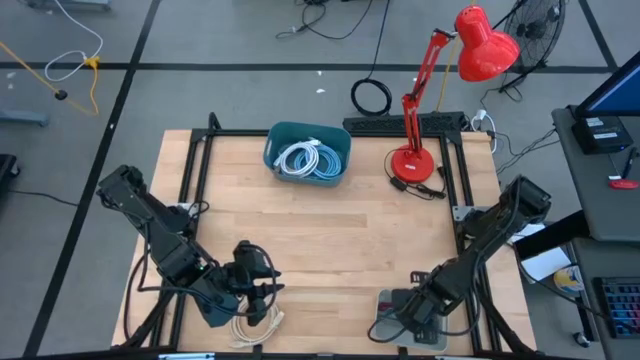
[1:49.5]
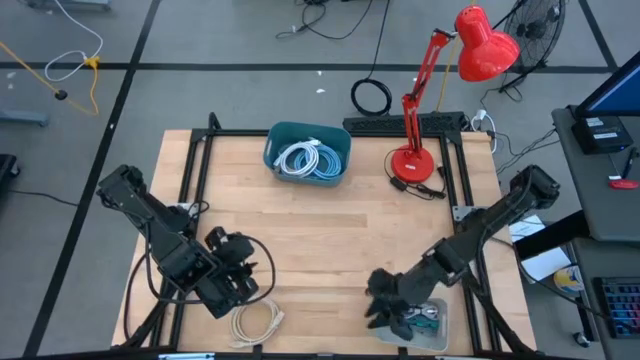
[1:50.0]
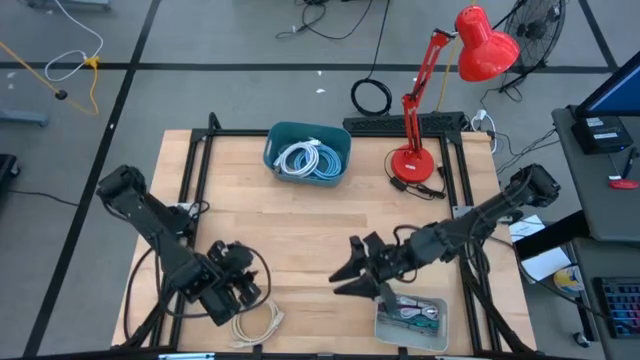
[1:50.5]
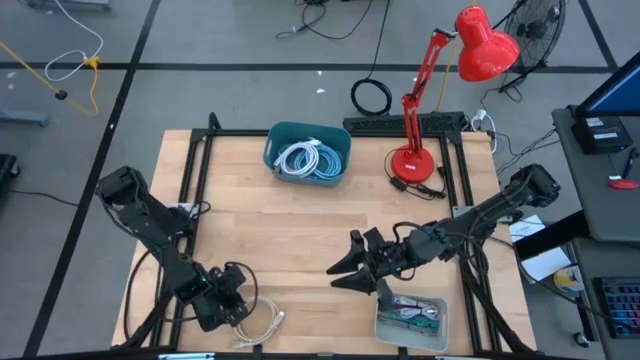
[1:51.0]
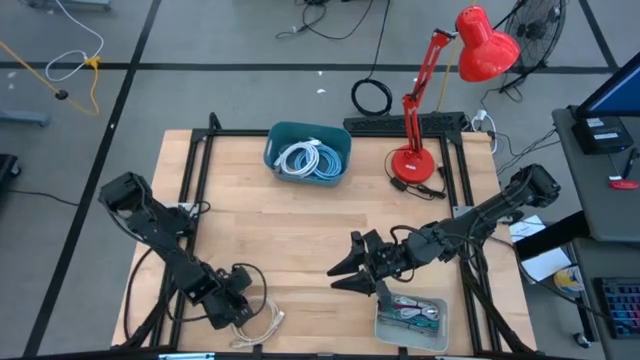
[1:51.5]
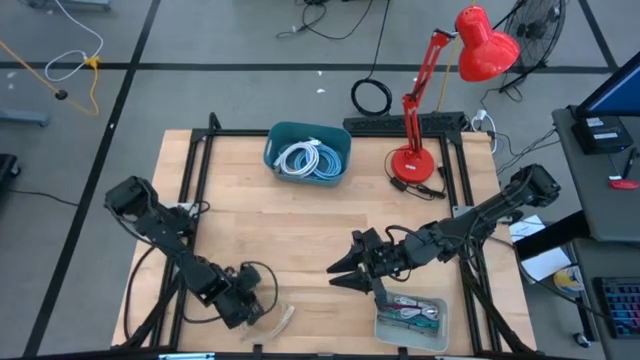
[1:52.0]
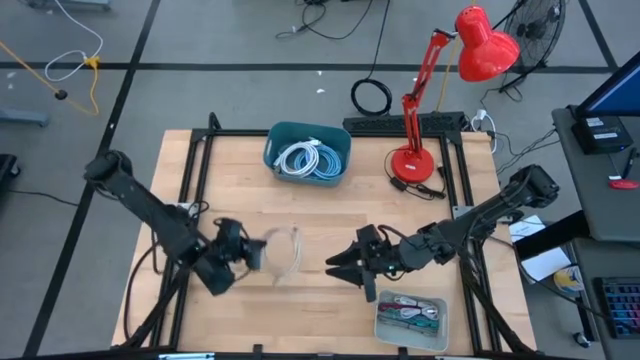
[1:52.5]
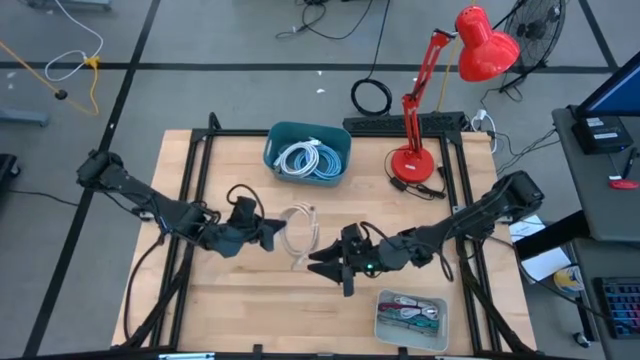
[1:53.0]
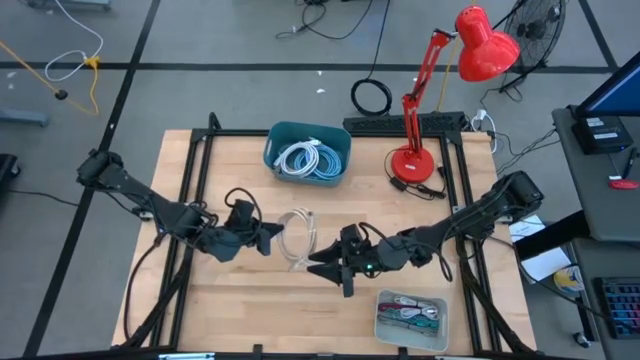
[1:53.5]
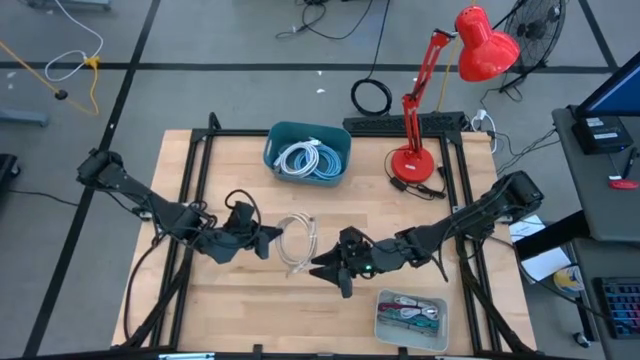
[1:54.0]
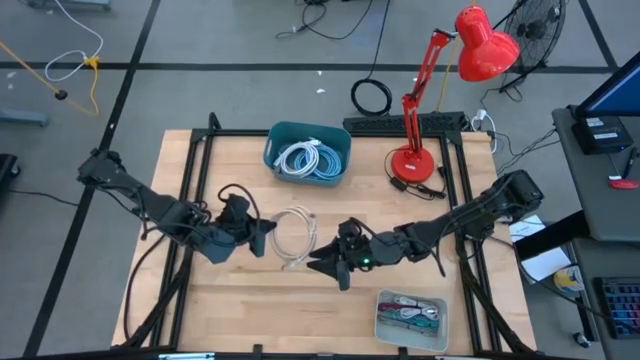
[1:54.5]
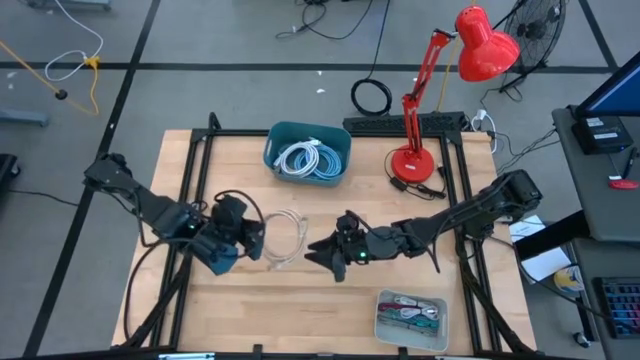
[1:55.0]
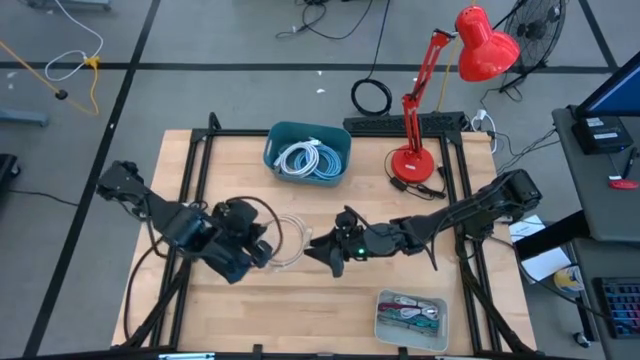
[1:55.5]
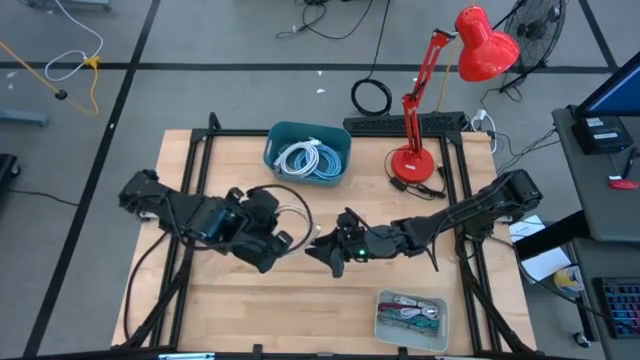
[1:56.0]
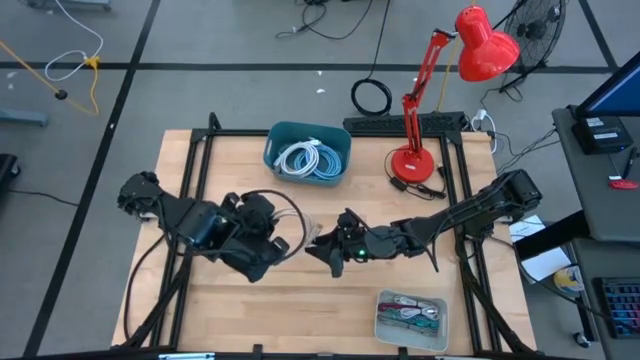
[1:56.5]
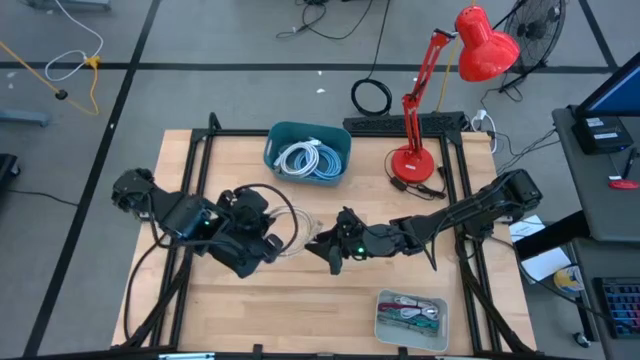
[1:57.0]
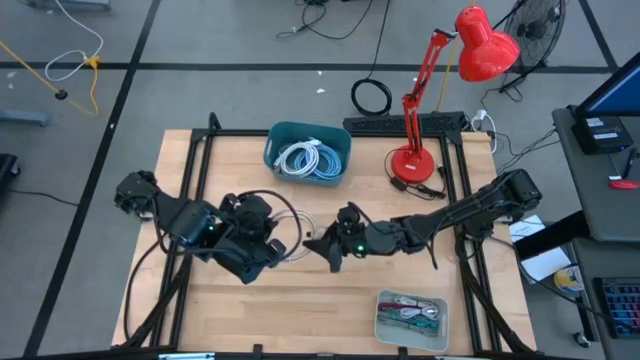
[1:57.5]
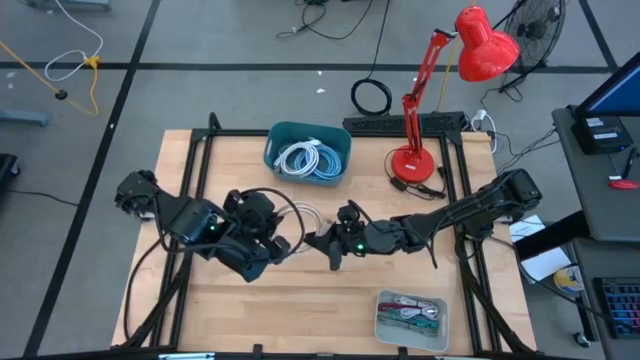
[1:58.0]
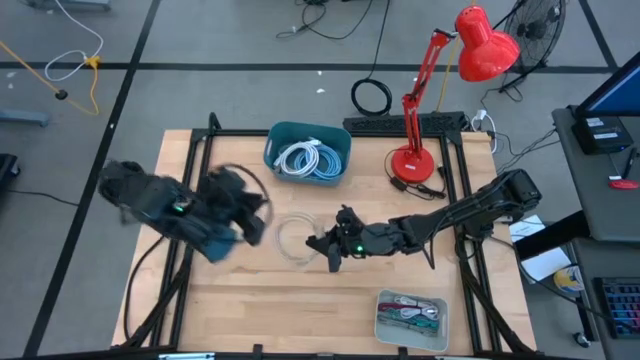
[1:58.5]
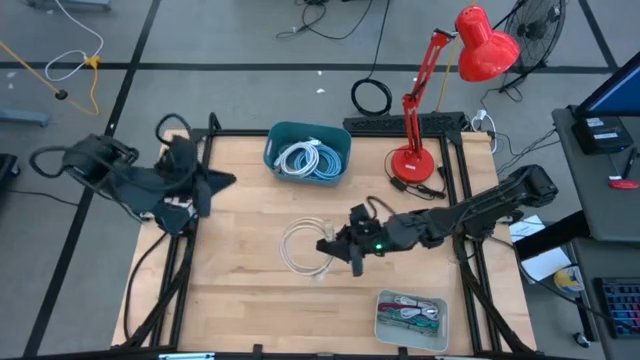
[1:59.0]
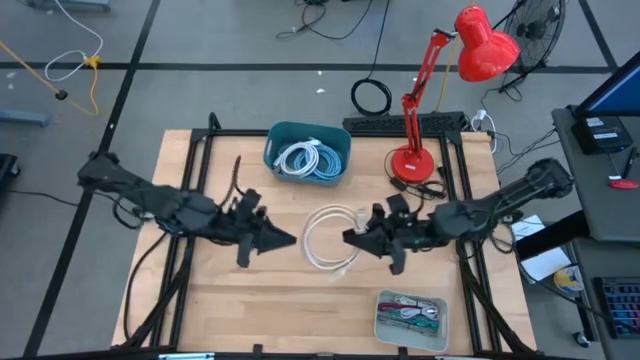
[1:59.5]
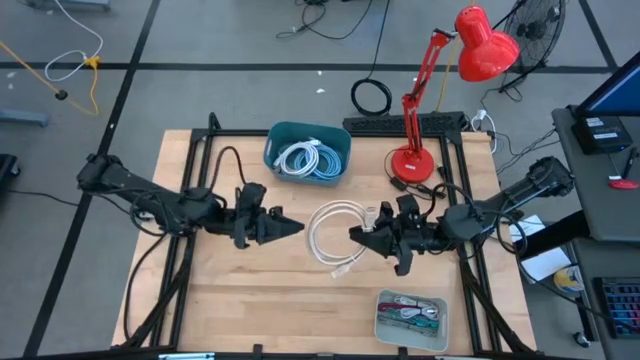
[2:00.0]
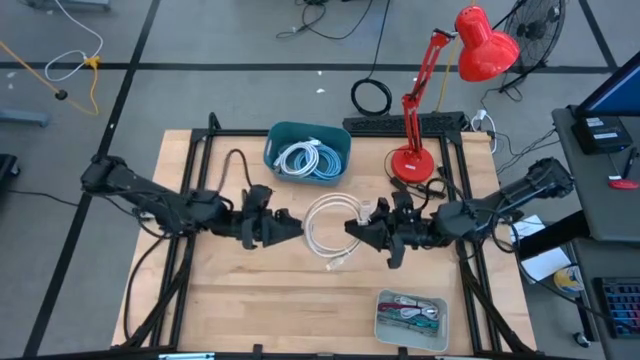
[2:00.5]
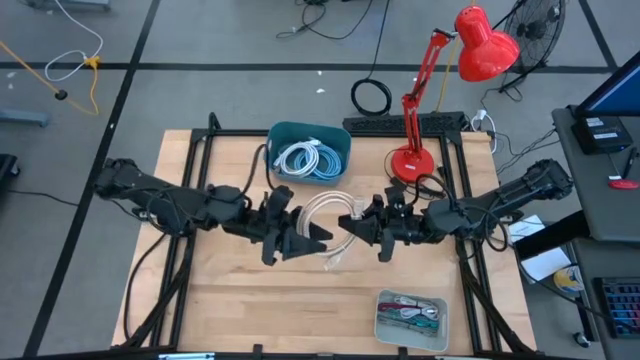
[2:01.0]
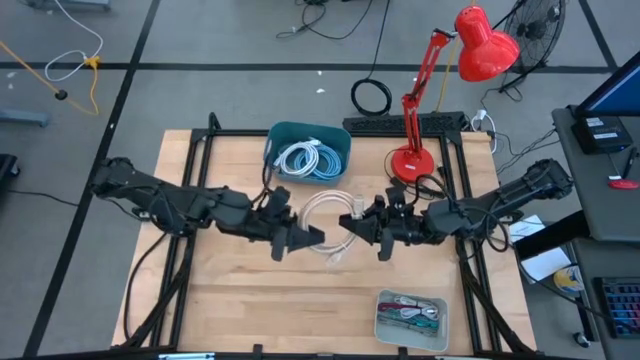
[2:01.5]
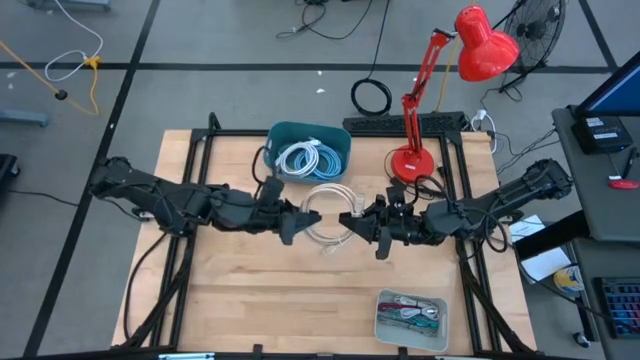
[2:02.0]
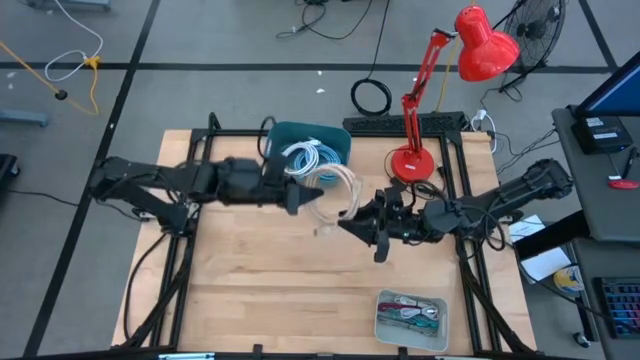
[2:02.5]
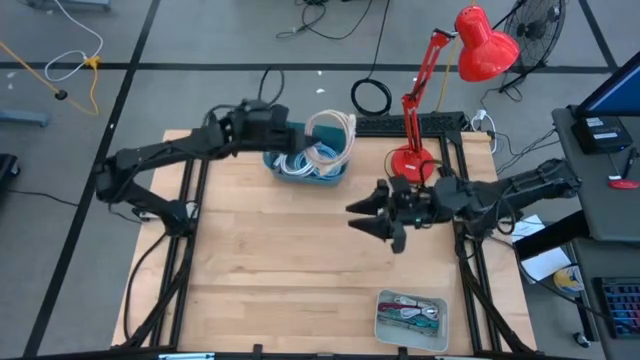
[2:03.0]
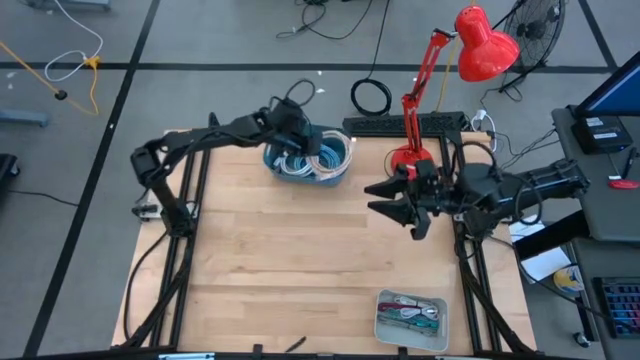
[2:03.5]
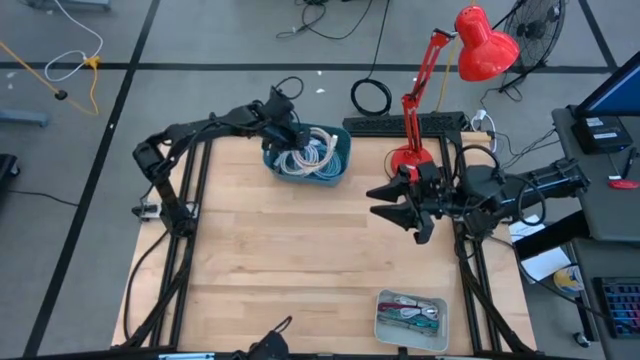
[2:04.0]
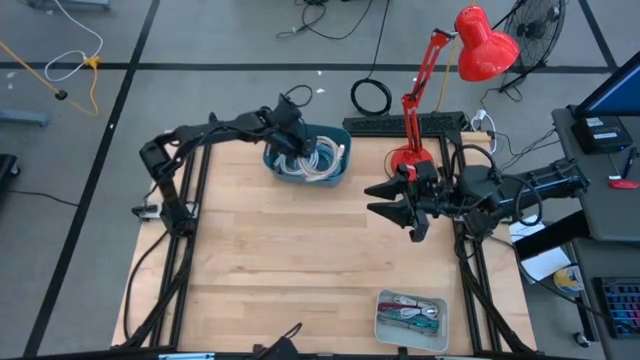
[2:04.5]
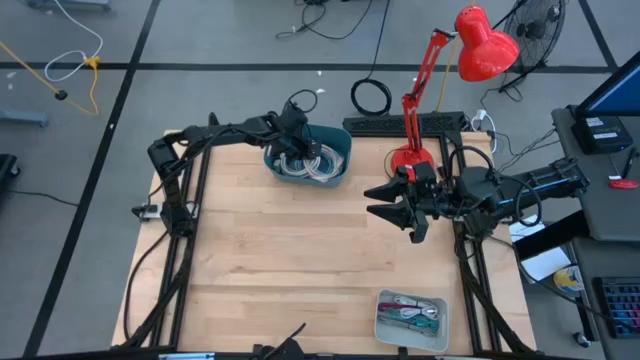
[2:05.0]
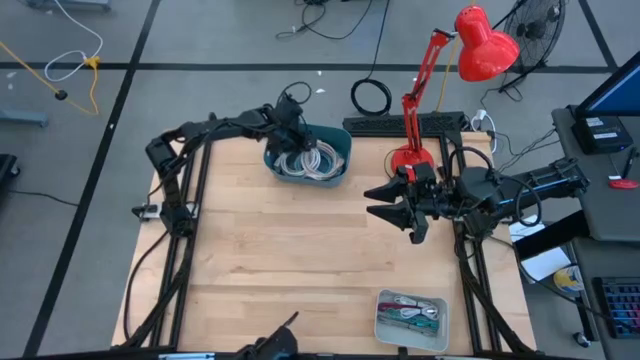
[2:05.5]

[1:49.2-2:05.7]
Task: Sort cables into bins
Put the brown HDMI cable into the blue bin

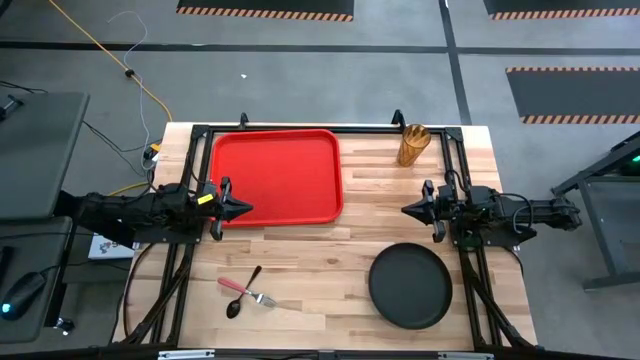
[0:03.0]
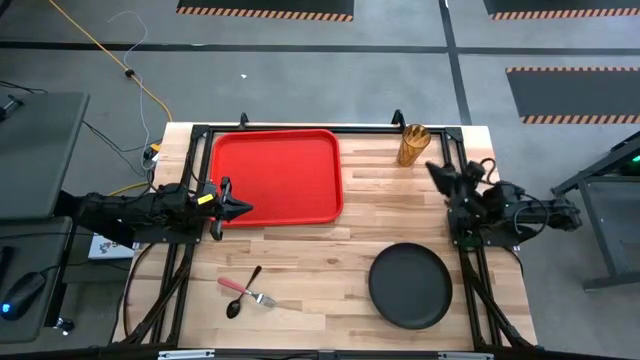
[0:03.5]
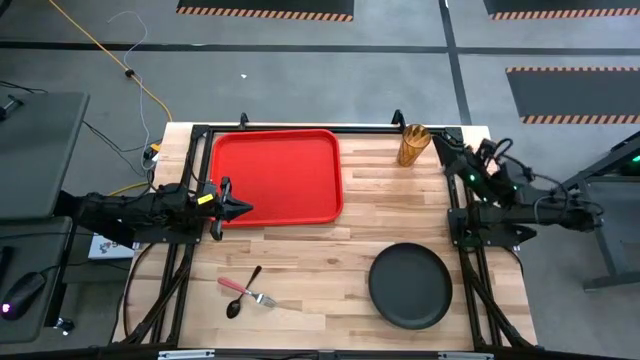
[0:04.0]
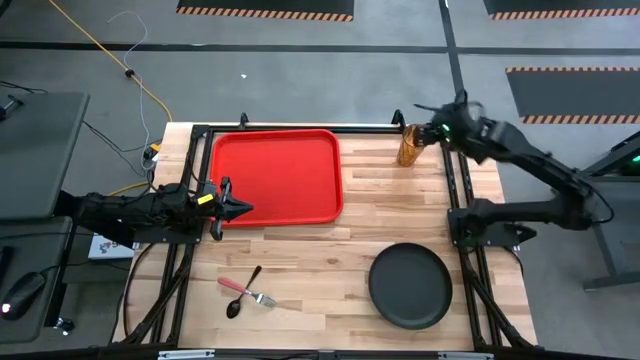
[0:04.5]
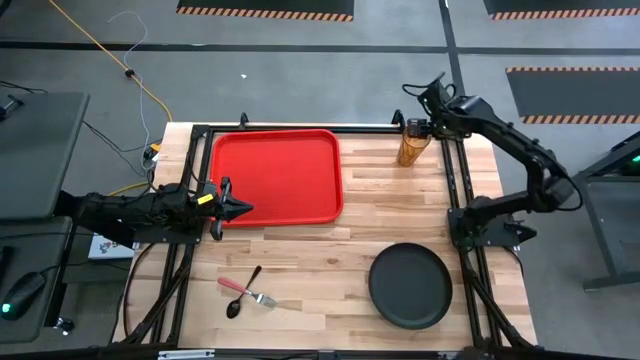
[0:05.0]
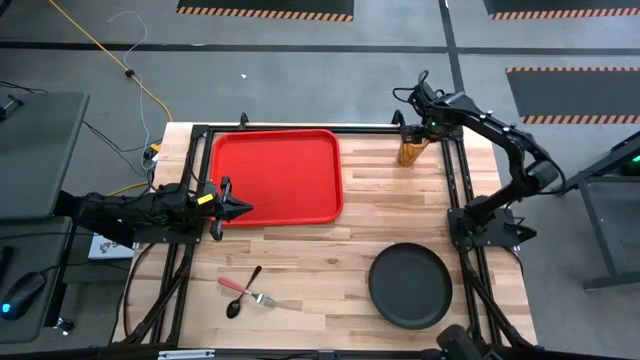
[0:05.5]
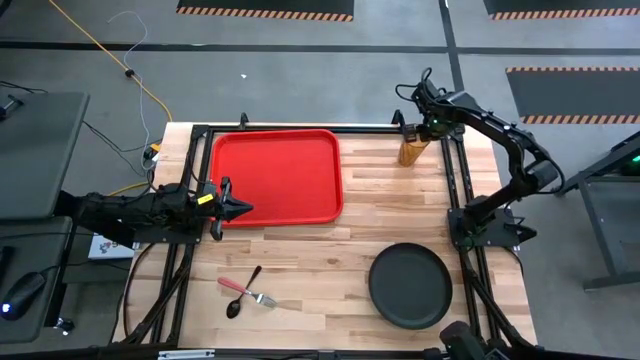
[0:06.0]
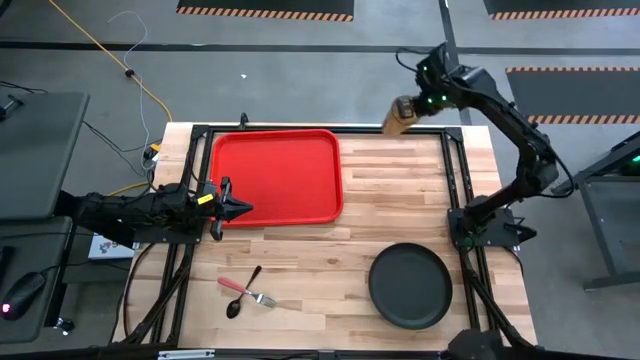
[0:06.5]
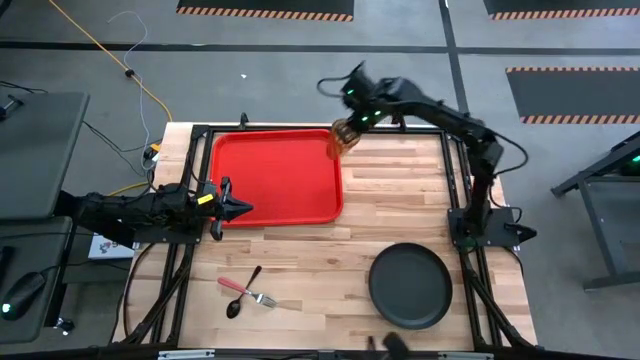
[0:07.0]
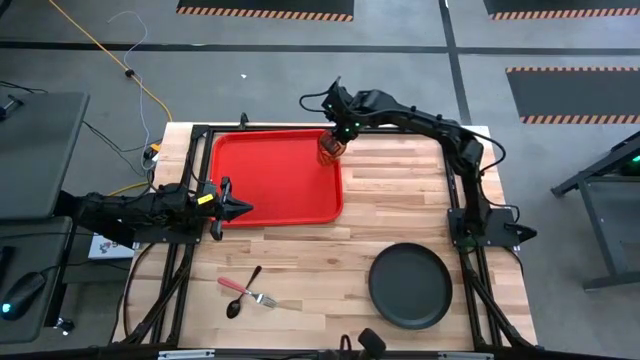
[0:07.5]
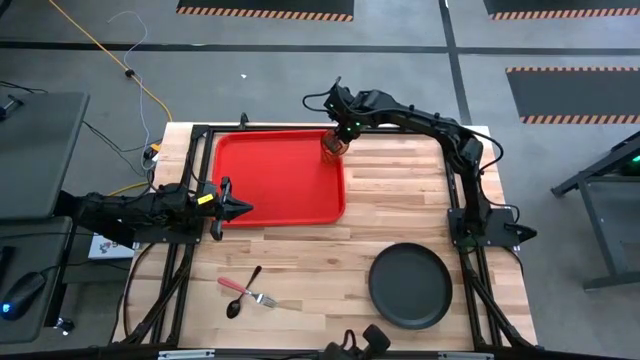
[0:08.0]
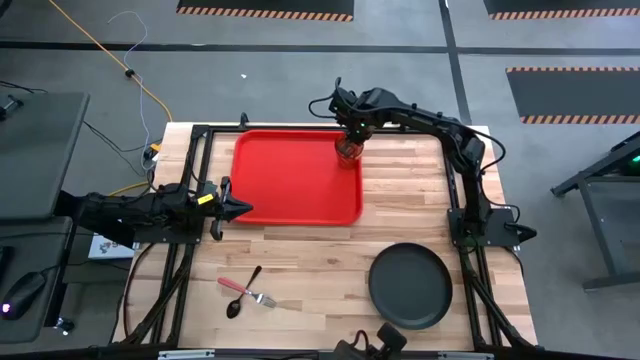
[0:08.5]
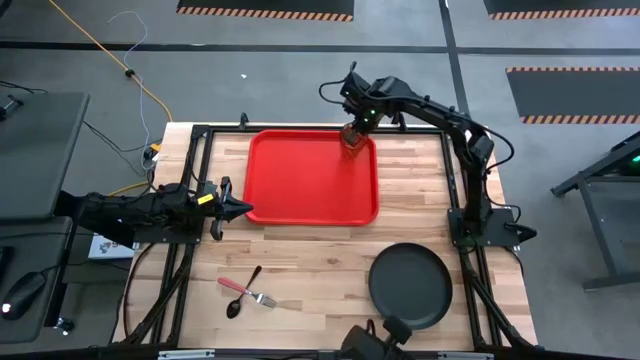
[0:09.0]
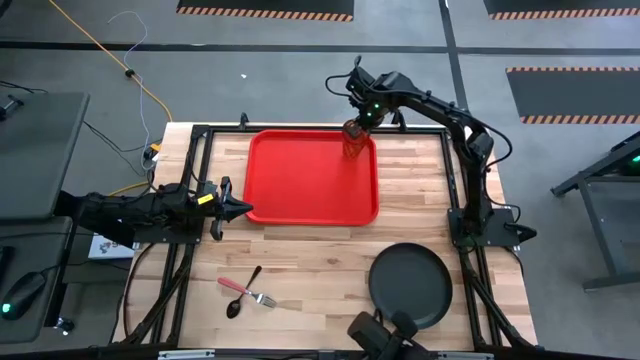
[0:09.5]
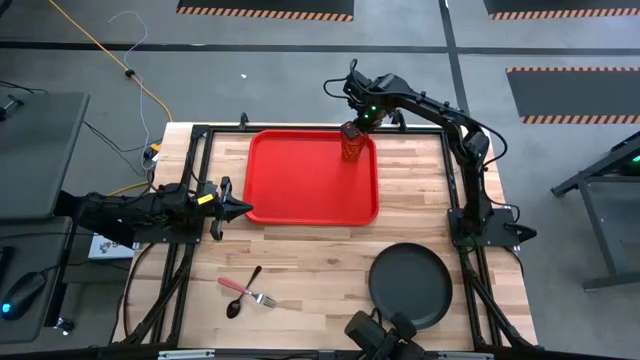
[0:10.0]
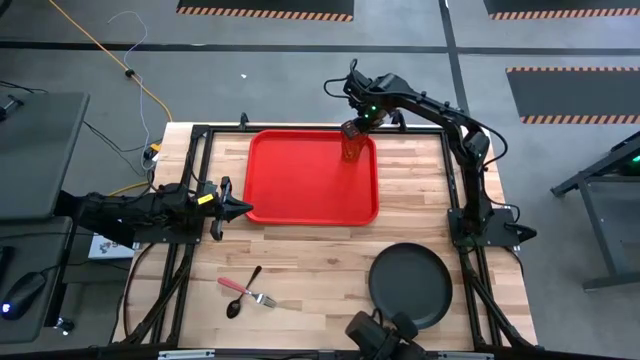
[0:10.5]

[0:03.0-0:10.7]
Task: Pick and place plate/cup/fork/spoon on tray
Put the brown cup on the red serving tray
